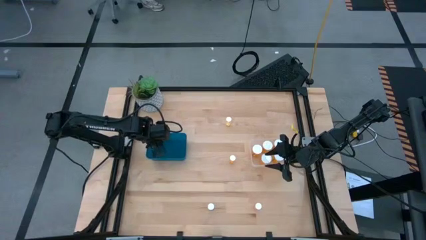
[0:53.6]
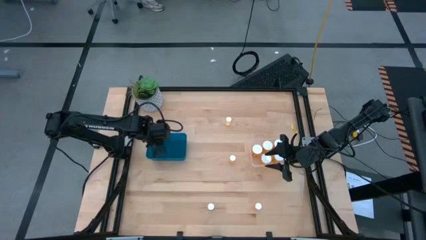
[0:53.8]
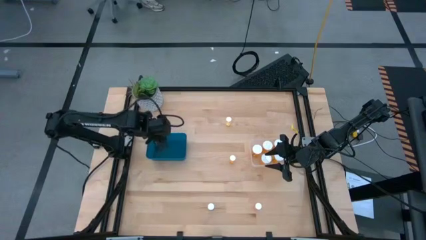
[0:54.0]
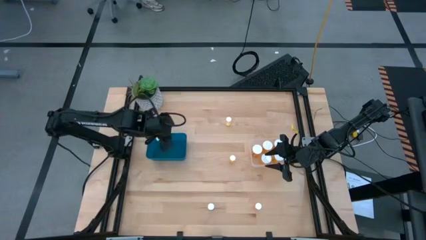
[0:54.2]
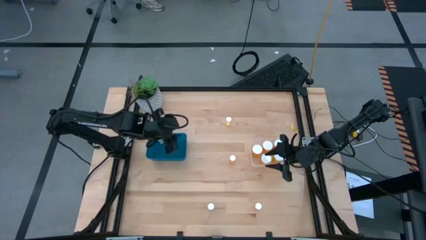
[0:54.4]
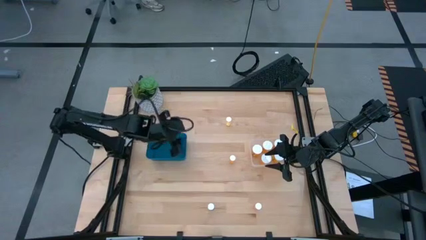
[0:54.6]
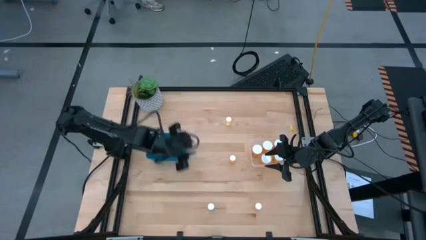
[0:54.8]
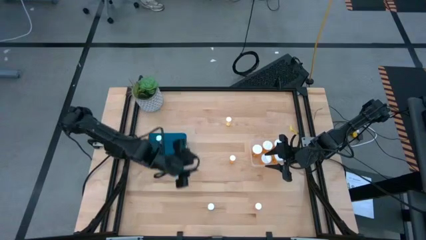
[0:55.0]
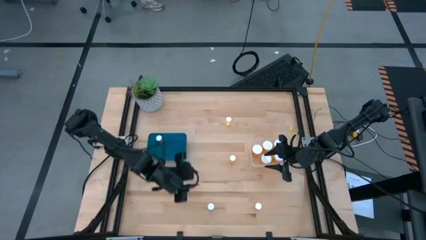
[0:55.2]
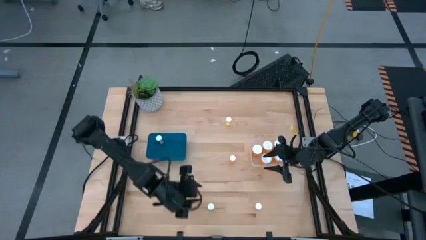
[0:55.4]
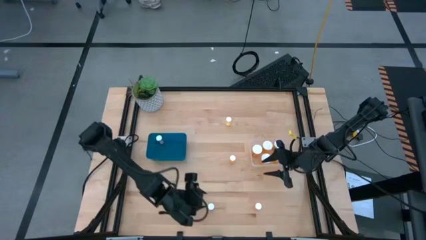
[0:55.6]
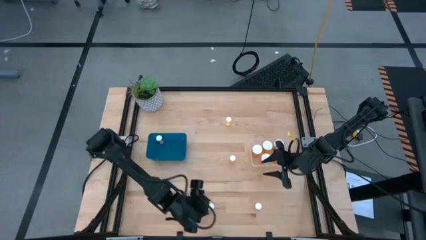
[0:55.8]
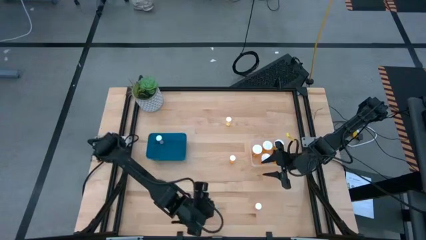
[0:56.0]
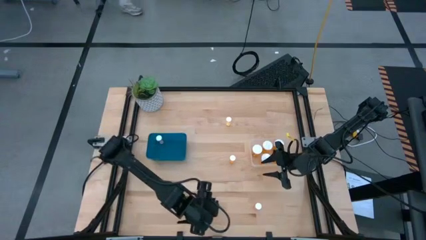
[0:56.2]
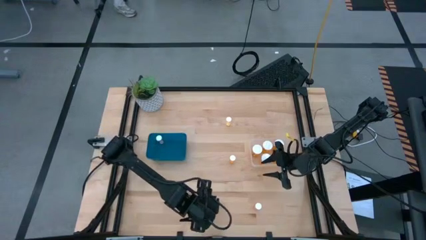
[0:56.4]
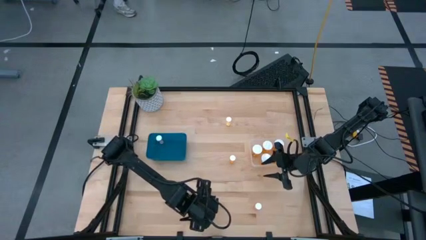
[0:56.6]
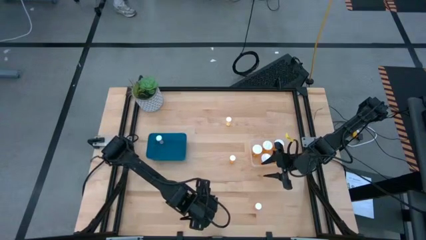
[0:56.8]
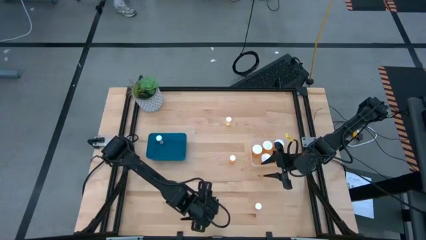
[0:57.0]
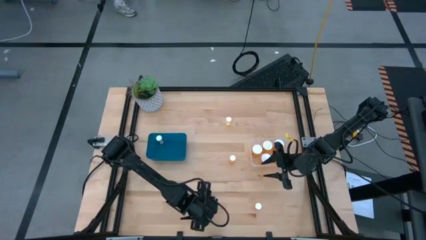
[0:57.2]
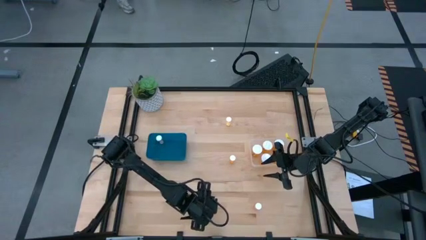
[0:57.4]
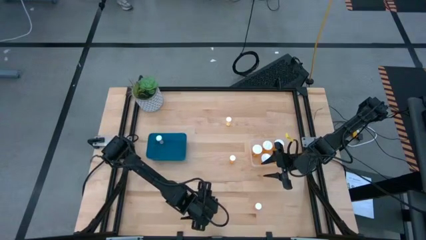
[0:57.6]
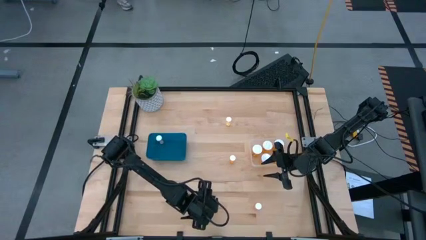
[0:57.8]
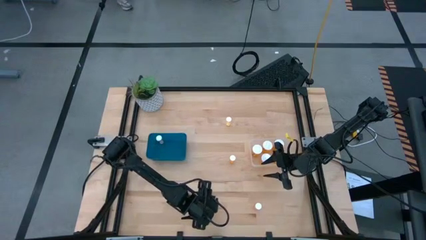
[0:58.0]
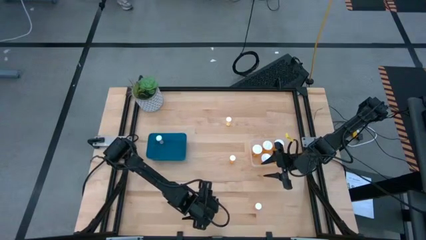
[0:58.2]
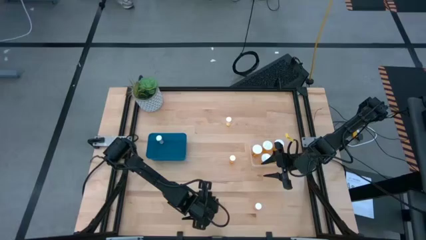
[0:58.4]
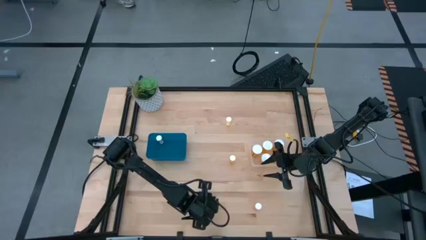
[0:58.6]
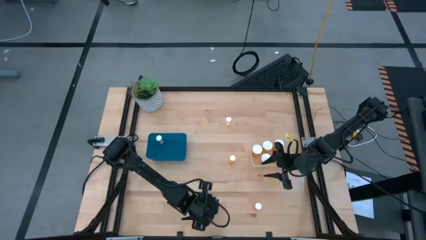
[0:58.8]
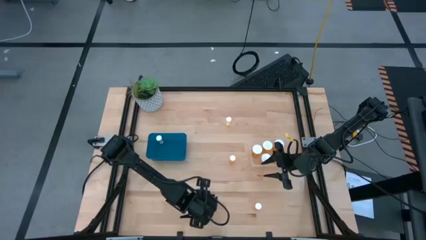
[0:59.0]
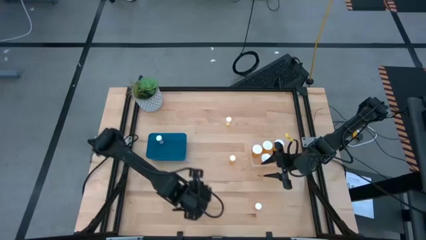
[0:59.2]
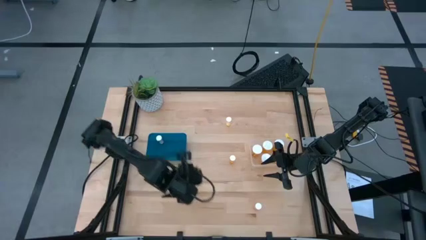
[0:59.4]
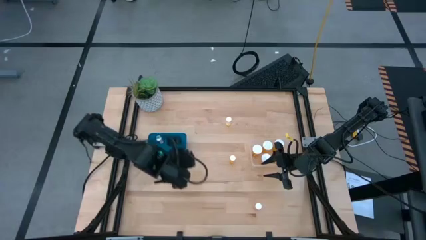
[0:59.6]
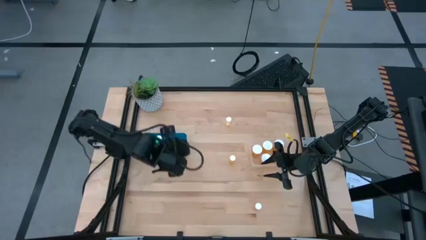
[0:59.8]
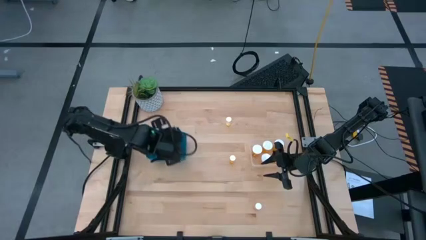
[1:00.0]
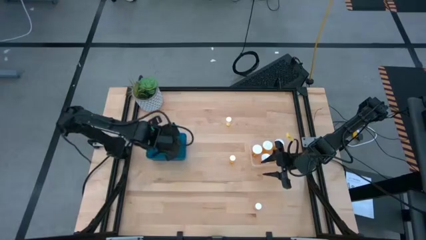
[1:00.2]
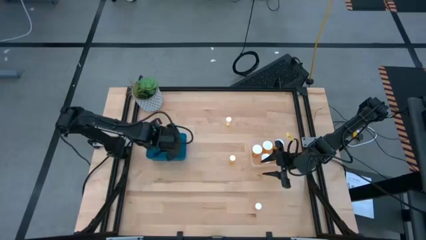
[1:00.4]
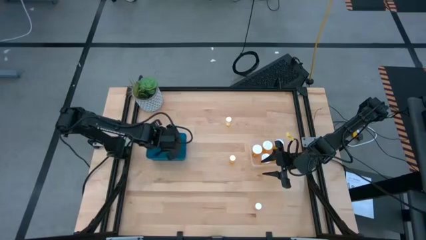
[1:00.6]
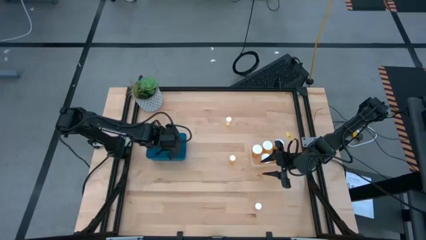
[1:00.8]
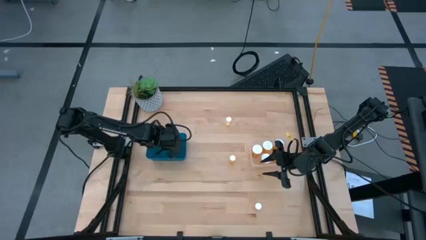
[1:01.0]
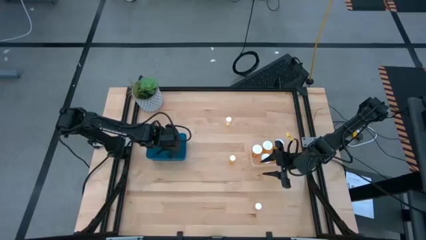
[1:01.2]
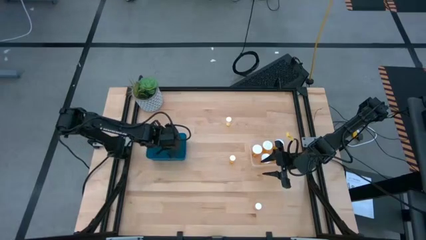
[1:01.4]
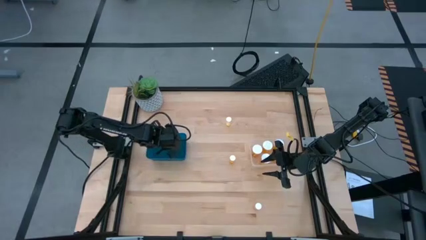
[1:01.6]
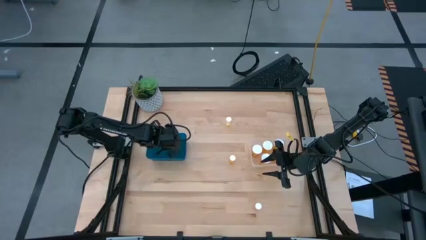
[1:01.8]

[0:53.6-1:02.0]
Task: Pick and place medicine bottles into bin by pill shape (circle, oval)
Put the small blue pill bottle into the blue bin

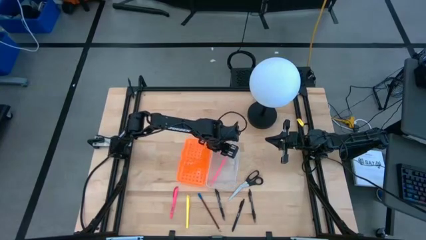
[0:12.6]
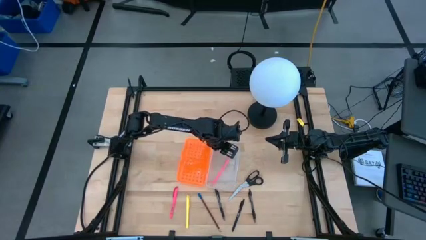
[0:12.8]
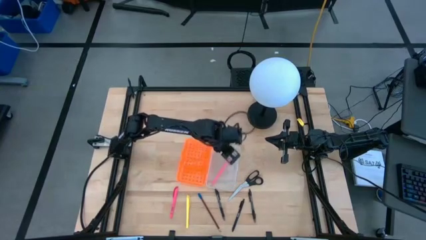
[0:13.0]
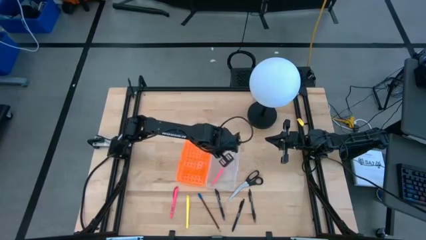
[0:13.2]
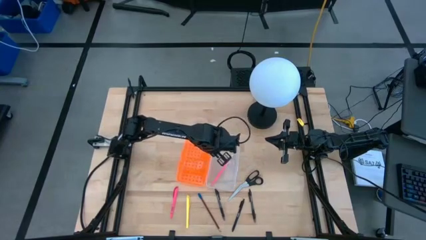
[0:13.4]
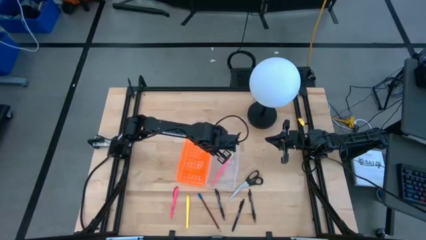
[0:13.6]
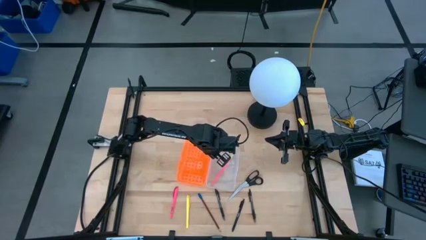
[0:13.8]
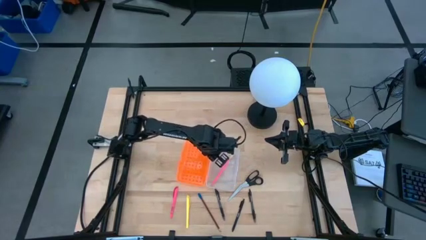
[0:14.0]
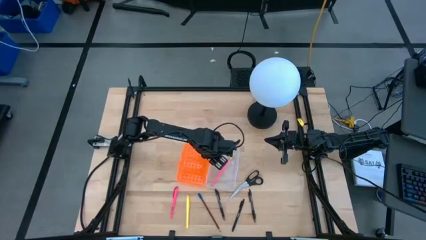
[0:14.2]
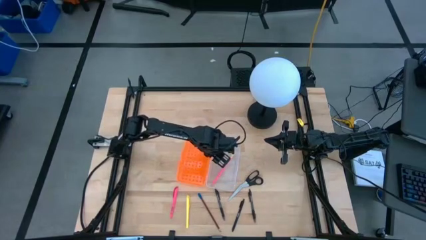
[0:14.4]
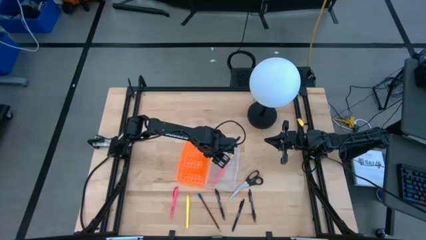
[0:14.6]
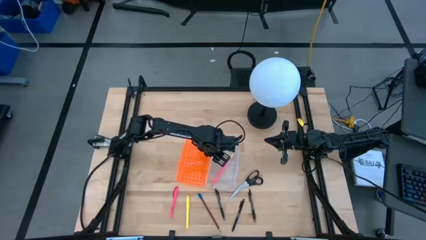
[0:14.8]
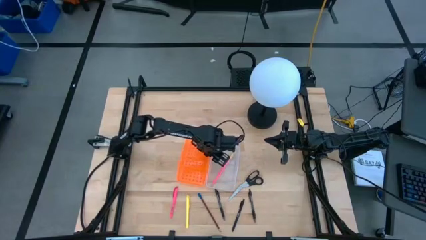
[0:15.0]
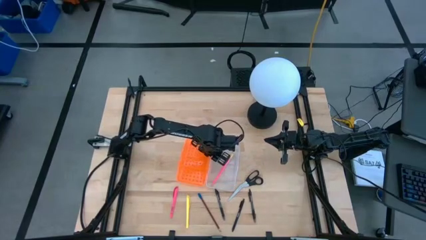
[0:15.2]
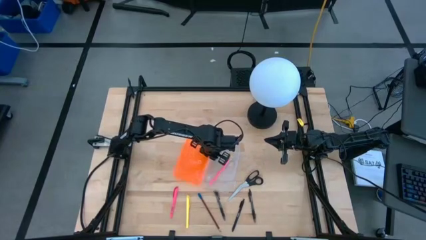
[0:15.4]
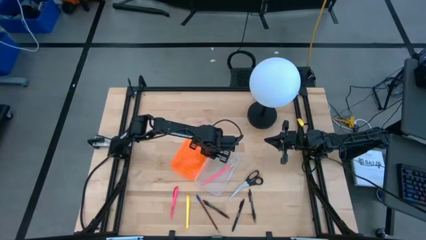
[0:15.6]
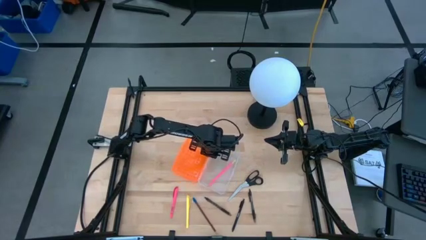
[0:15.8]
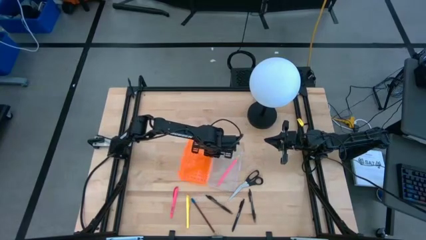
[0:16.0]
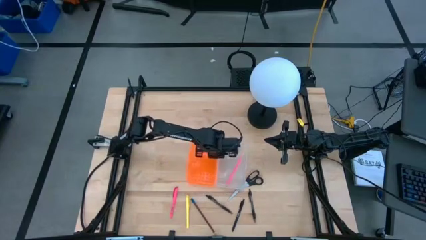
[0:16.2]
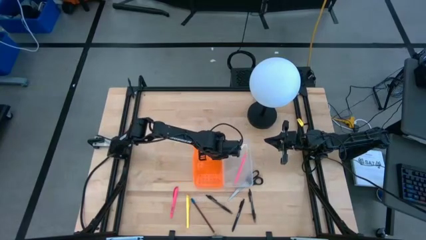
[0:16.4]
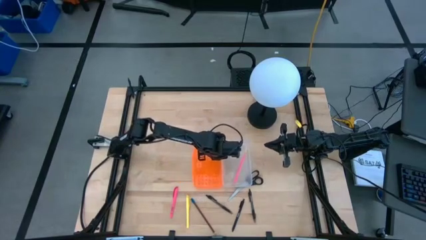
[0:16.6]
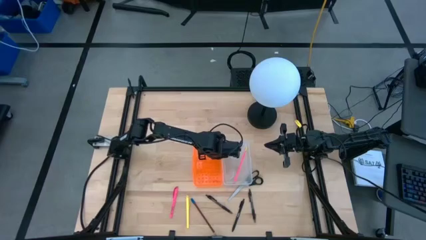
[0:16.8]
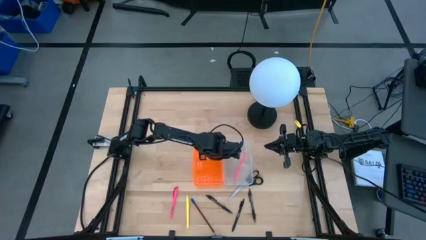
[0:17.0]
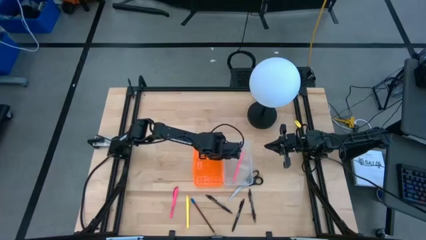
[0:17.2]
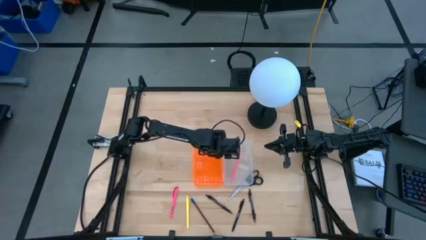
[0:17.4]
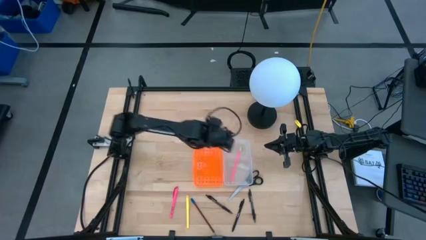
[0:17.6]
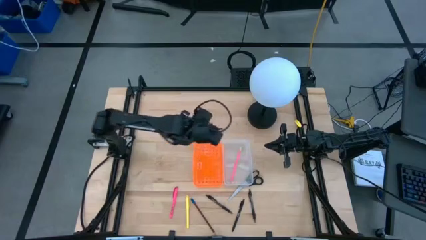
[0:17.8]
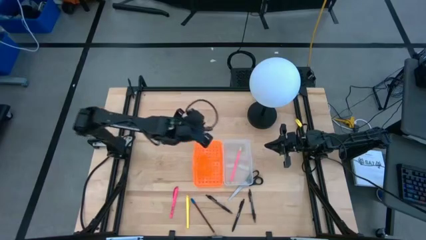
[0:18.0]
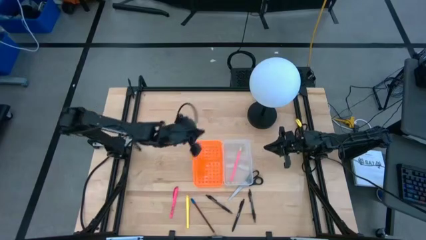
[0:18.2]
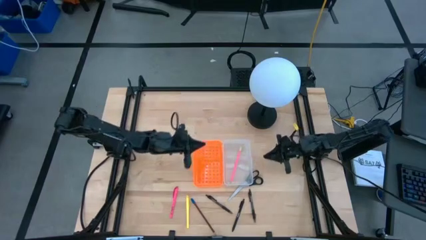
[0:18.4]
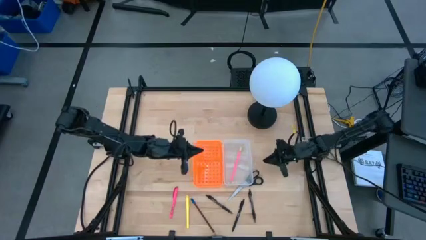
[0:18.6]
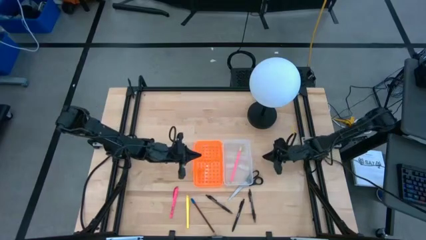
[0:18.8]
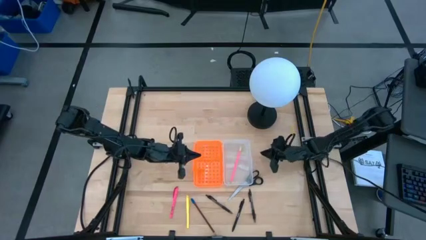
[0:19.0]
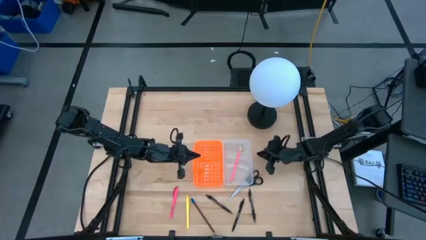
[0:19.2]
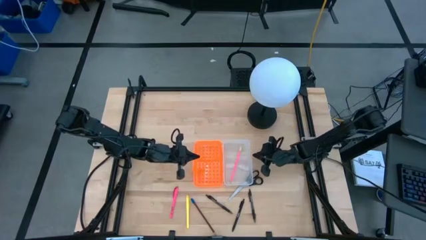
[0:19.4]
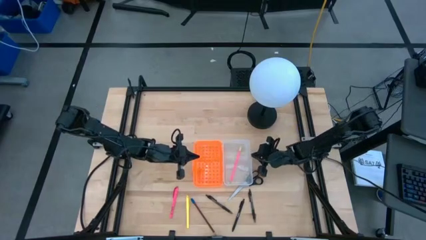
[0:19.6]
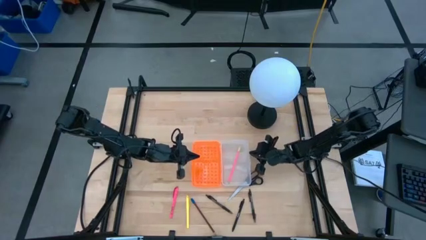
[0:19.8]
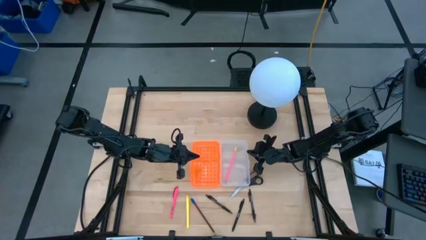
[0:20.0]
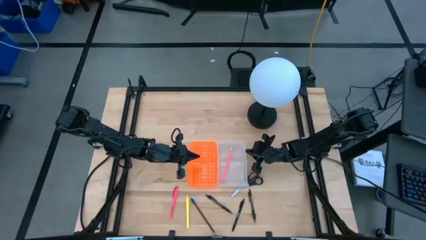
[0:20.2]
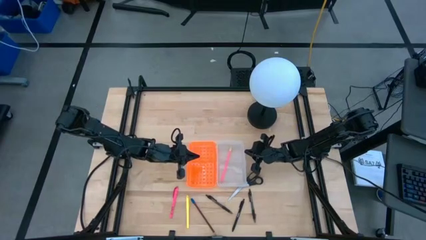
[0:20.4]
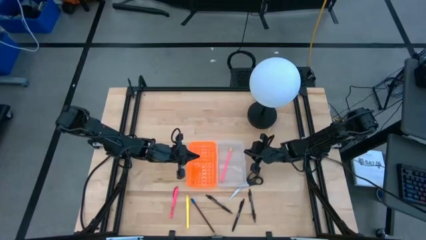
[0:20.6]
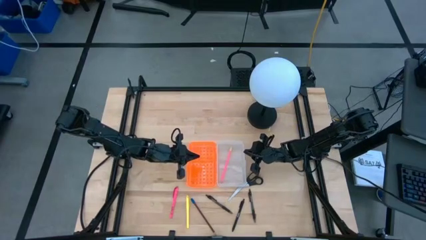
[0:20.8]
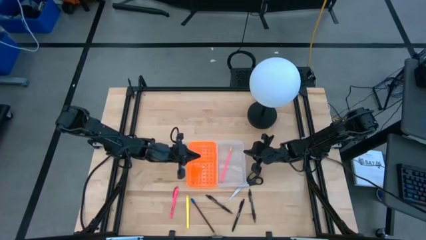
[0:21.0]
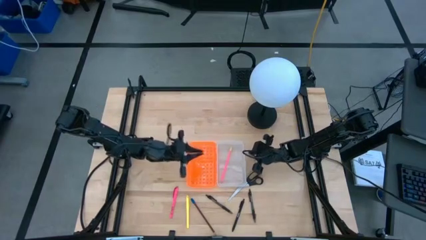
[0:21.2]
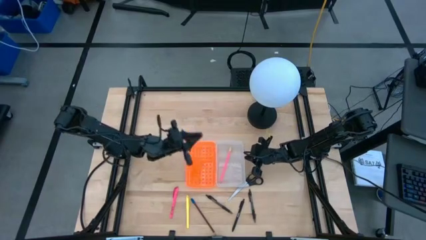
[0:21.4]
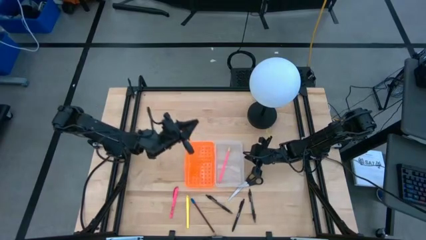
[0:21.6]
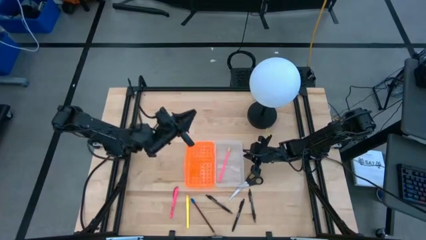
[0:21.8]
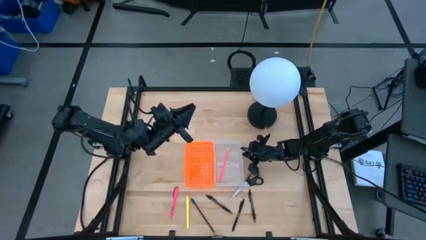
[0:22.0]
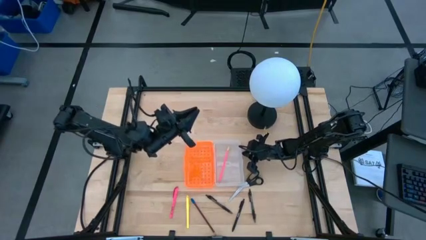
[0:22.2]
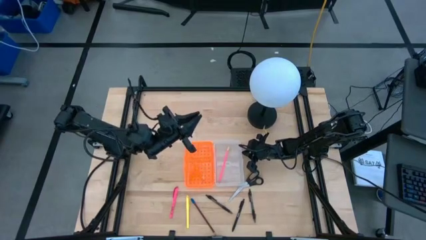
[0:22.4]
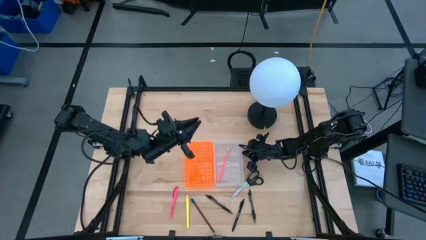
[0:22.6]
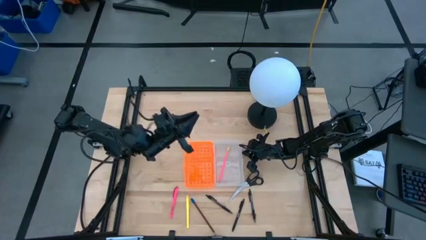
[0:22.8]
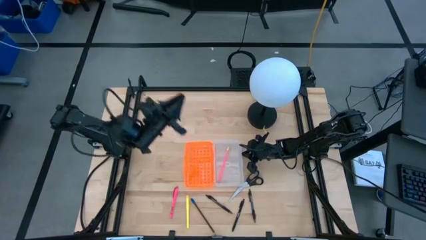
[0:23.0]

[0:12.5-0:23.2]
Task: Pick & place school supplies into a supply box
Adjust the orange supply box
